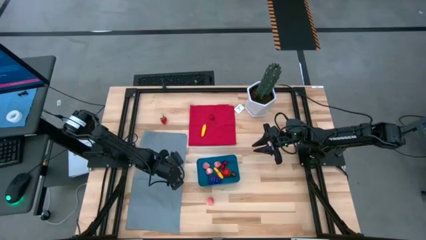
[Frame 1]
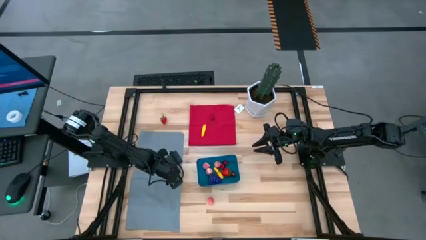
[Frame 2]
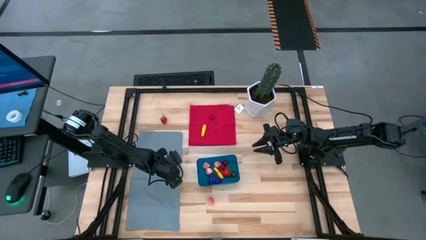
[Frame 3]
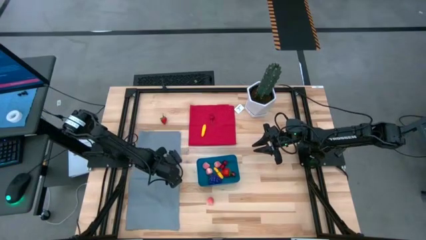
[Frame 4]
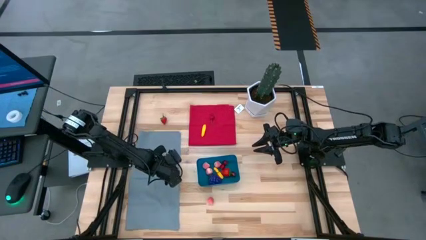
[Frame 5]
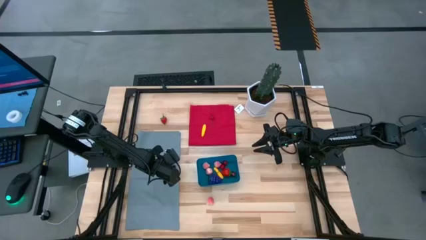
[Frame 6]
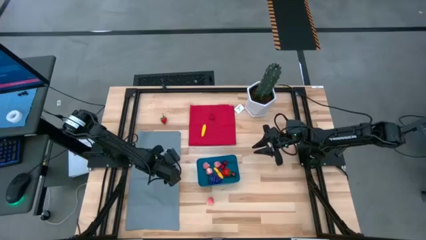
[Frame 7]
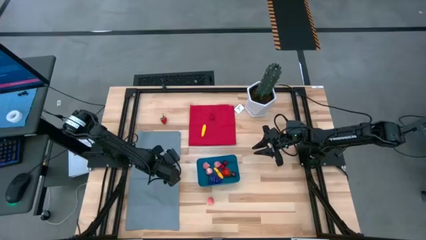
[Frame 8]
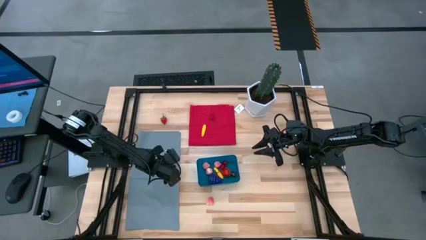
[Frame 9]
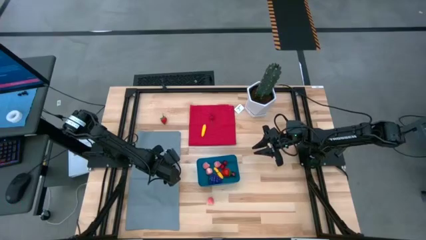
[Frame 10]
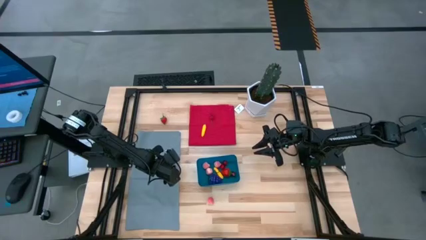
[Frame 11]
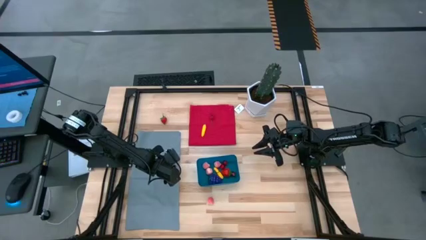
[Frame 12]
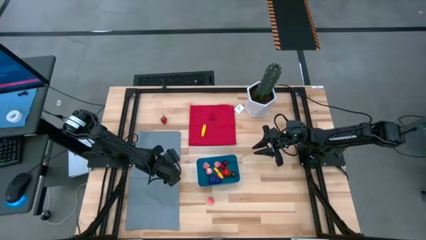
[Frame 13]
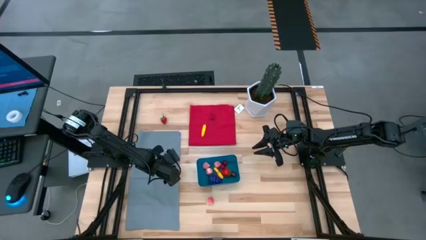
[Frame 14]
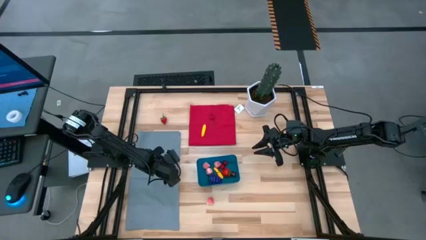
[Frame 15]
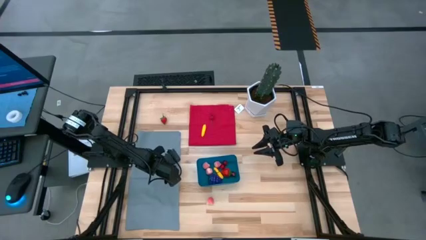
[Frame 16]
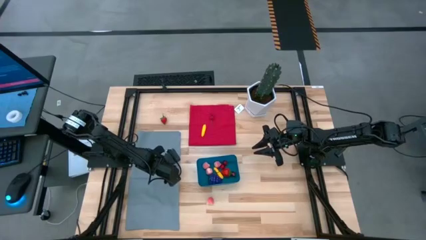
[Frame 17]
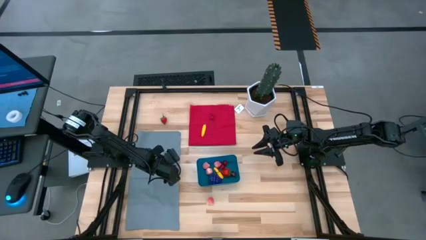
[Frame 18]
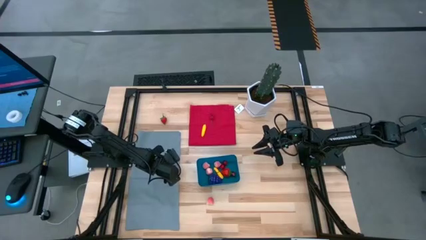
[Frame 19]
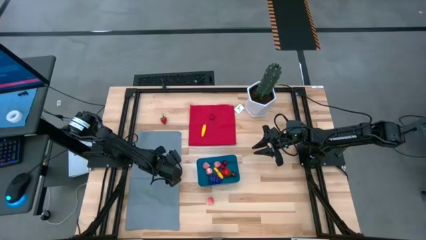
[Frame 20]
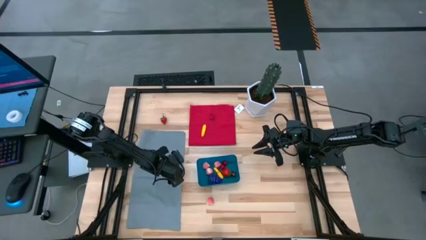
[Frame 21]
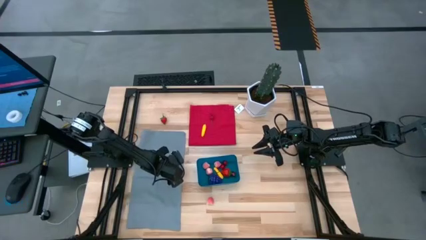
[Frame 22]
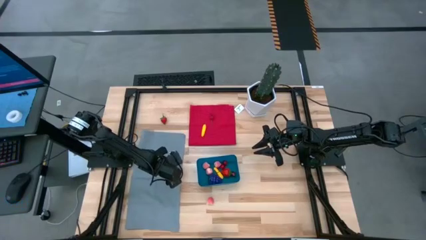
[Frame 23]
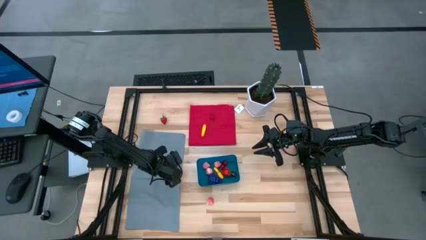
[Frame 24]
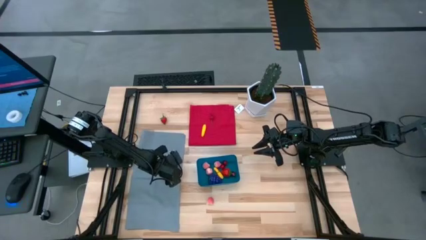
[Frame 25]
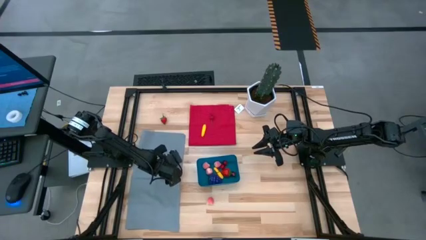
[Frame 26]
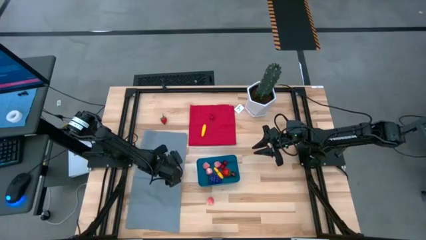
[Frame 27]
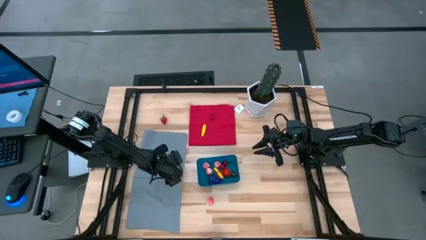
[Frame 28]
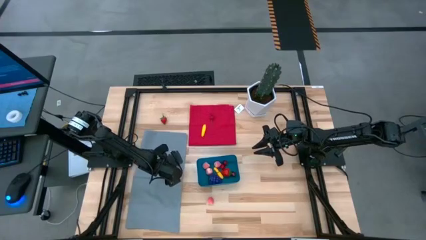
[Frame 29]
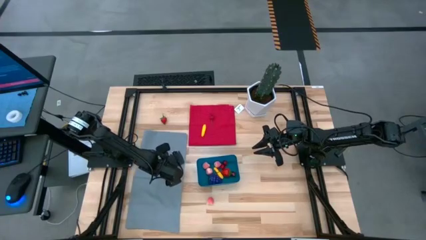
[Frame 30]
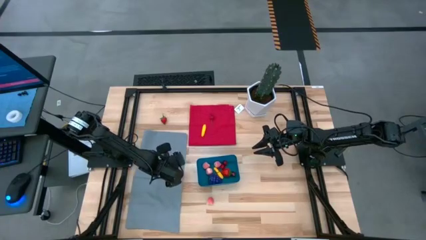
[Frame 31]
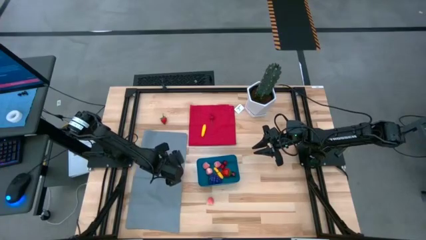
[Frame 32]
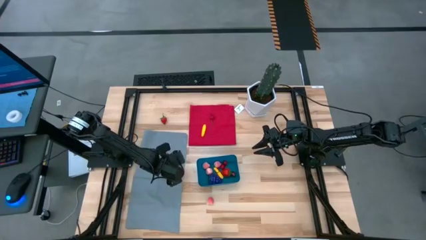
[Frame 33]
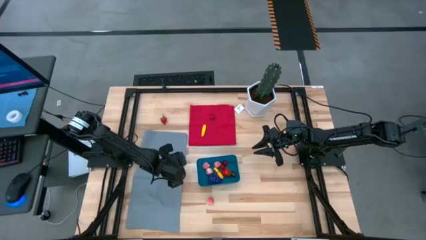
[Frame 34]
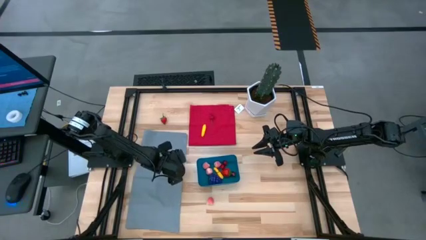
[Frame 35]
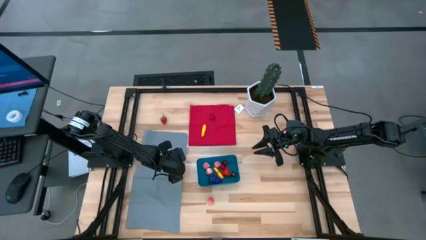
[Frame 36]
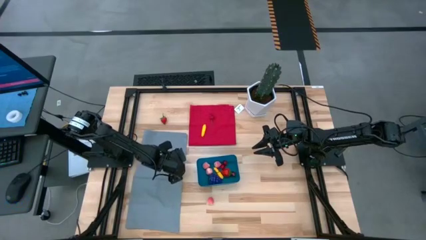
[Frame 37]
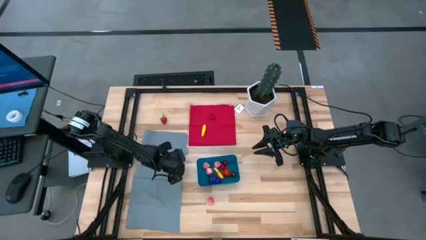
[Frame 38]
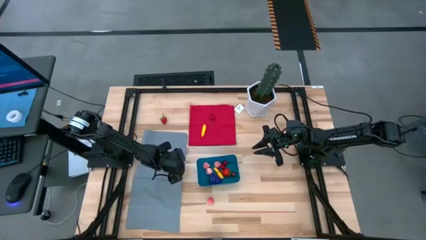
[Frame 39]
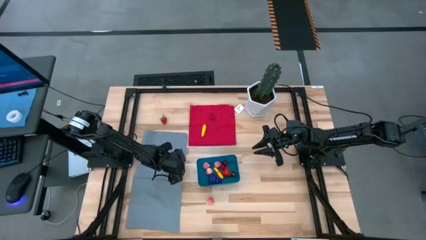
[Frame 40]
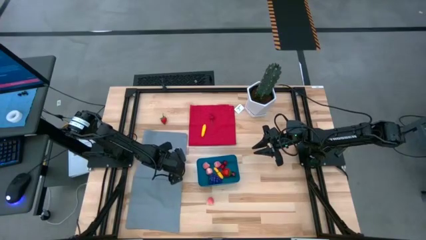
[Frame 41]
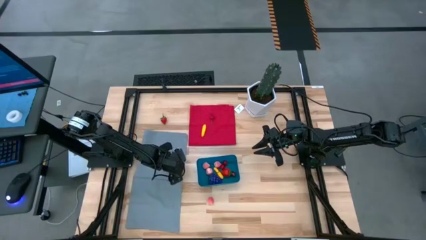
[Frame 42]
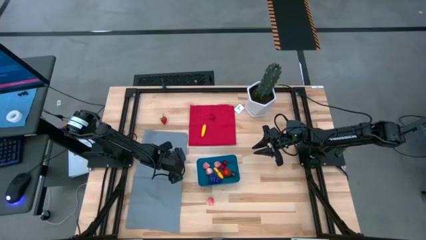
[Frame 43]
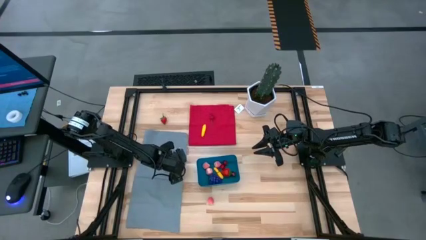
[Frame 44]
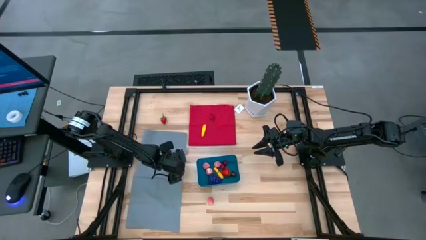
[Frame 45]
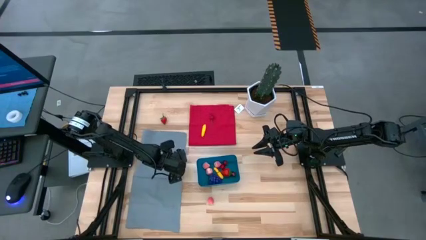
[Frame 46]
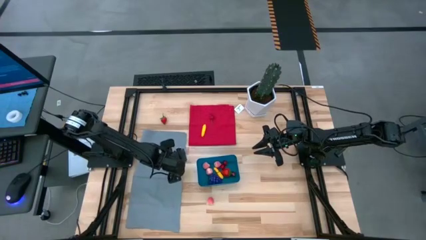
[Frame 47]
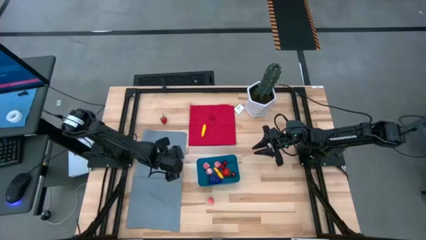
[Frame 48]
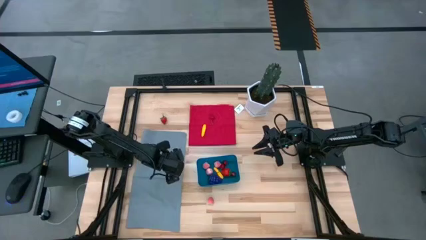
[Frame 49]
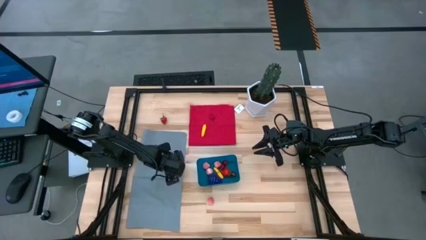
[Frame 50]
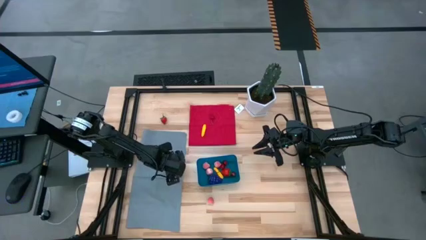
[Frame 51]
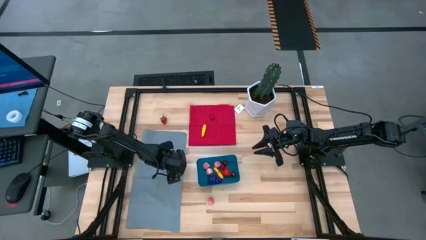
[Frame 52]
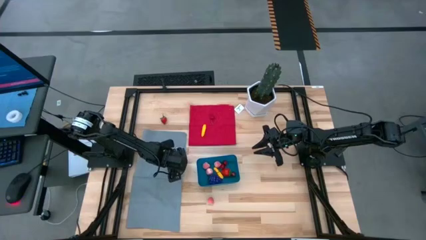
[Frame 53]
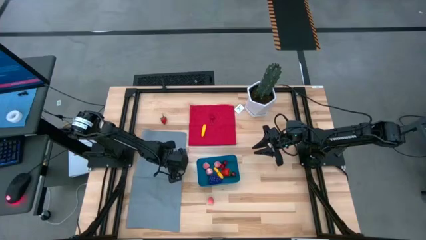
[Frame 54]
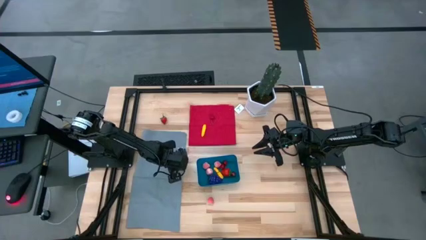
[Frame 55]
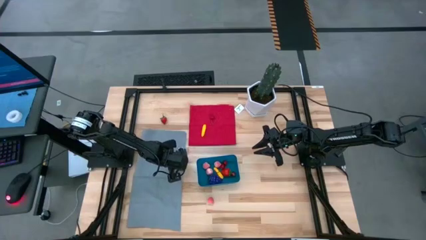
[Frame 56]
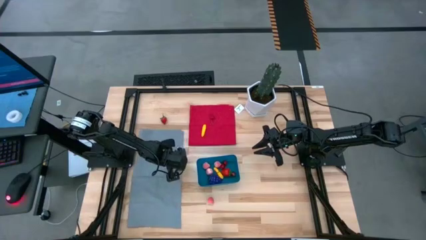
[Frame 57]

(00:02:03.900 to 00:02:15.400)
Task: Pick and placing Produce into tupperware
Put the blueberry into the blue bin

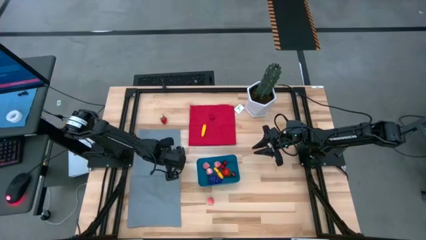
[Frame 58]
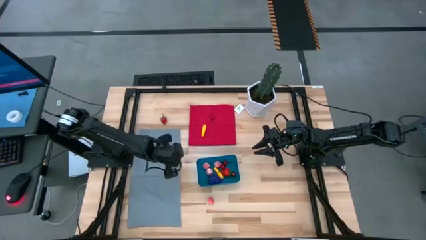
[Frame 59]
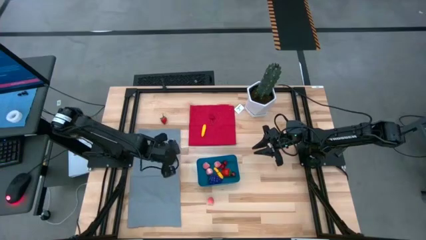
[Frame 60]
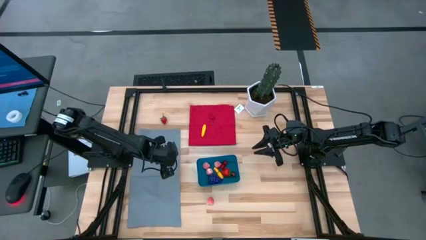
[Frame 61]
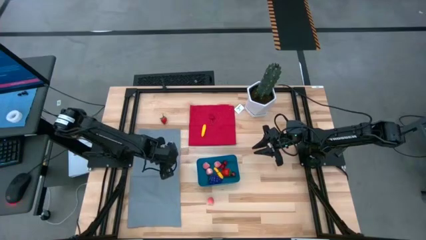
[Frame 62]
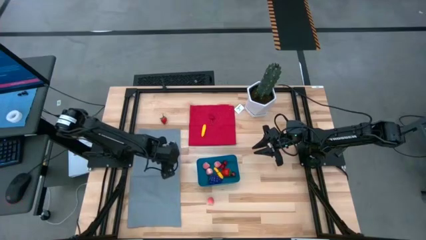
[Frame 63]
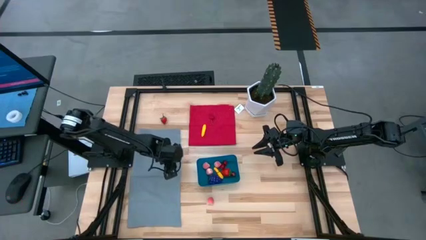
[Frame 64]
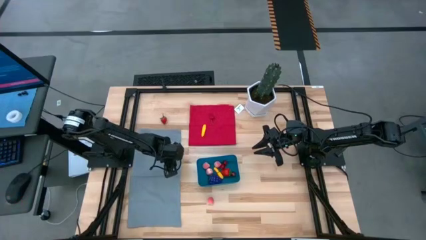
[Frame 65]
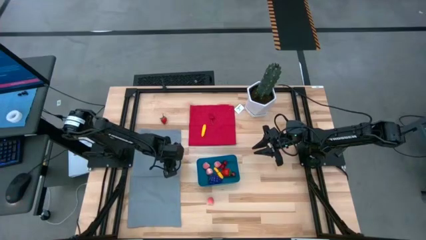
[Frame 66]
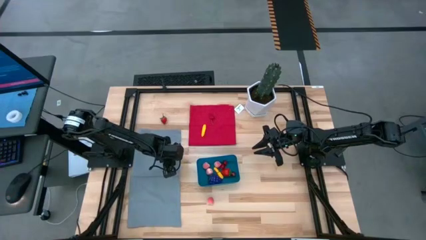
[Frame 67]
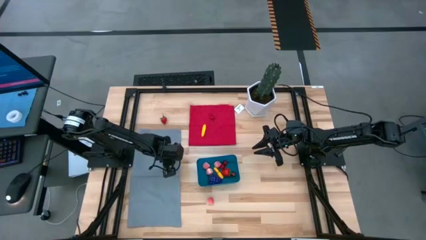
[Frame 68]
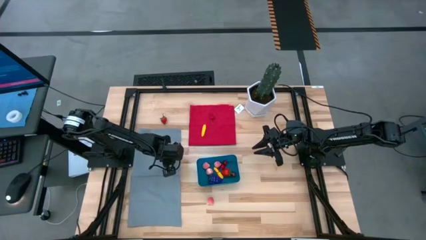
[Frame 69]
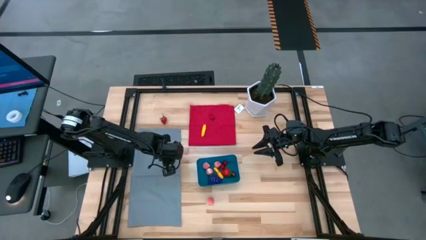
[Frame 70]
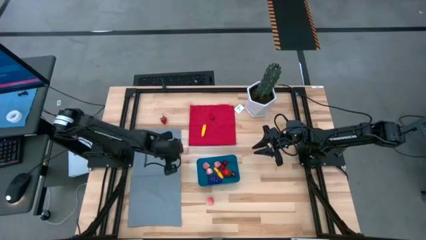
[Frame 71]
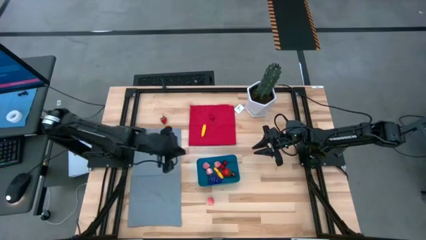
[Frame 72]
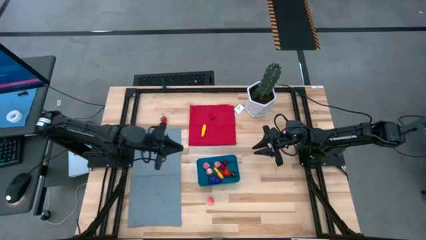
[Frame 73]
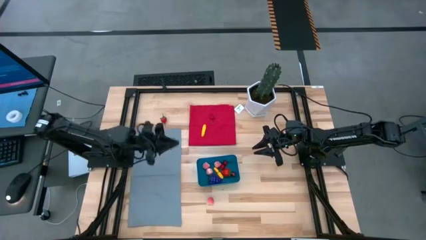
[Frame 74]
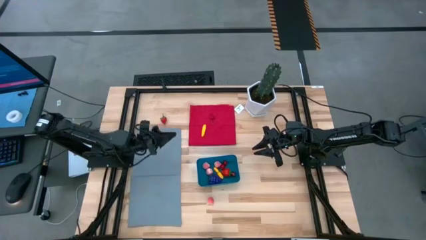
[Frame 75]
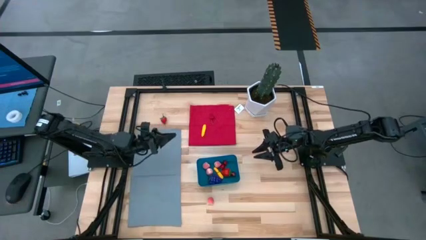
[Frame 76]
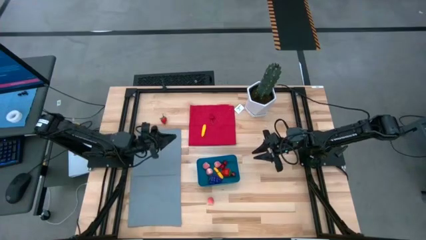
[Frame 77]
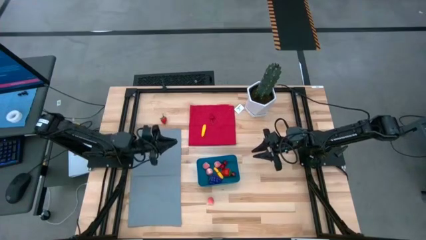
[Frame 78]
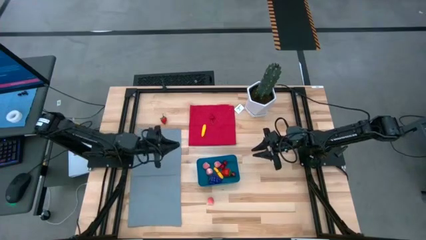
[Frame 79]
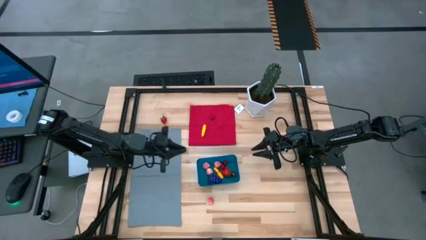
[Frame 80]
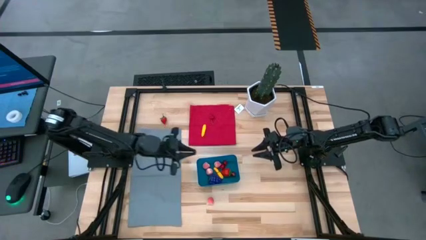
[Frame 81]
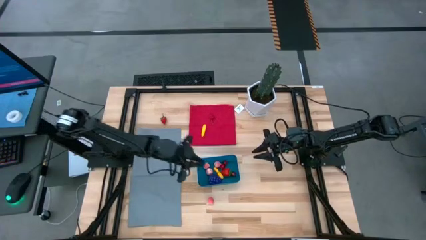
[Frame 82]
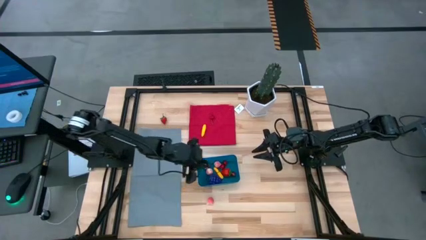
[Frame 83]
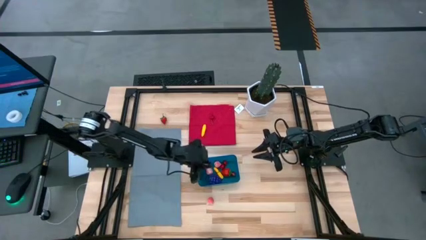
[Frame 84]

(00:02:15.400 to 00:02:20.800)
Put the blueberry into the blue bin
